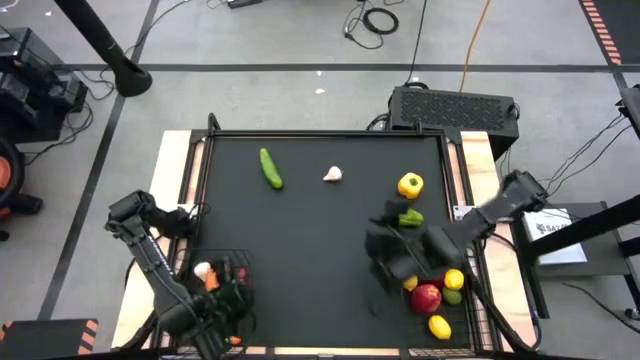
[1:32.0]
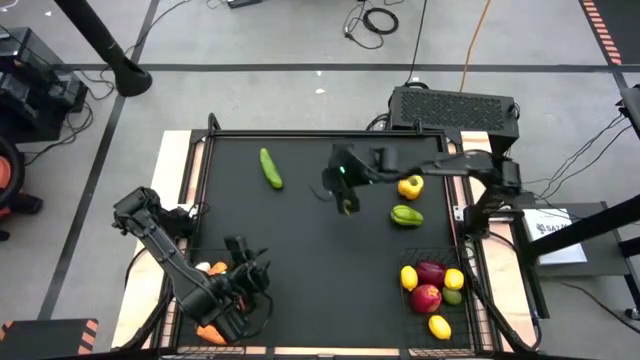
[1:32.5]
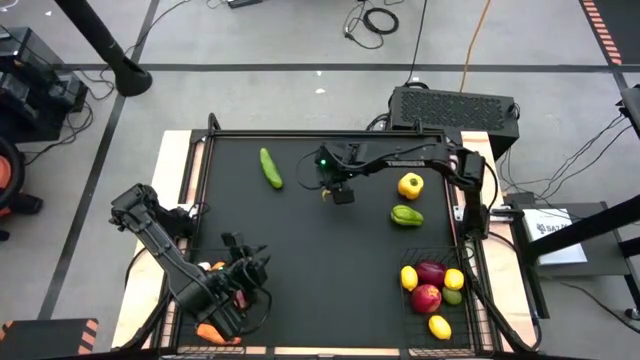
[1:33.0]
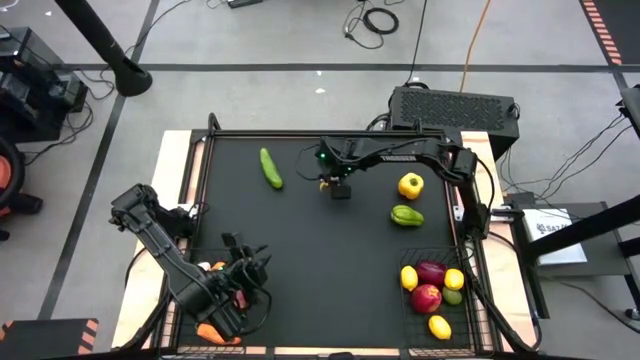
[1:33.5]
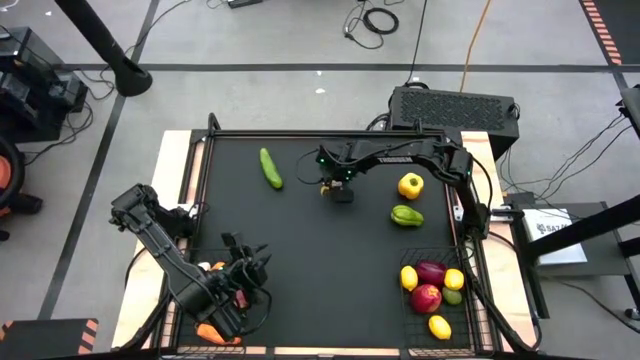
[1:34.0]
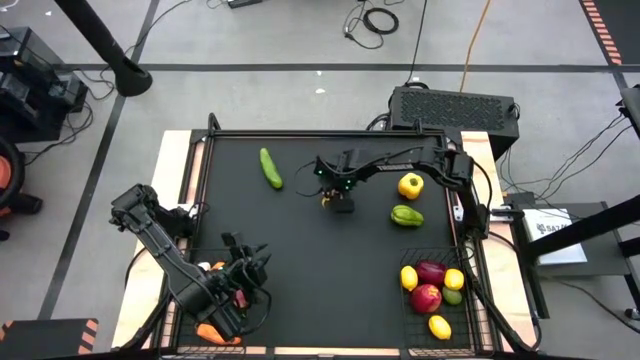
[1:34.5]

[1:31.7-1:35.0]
Task: Sort produce into baskets
Put the garlic into the the basket on the bottom left

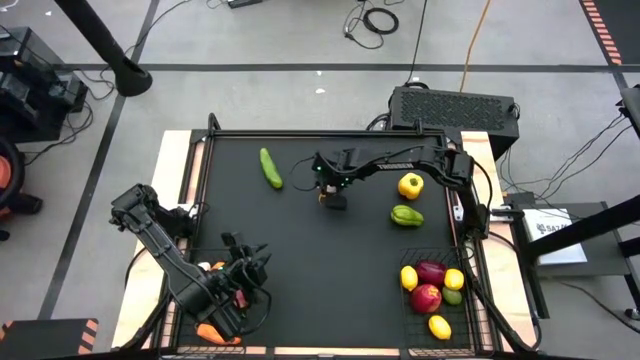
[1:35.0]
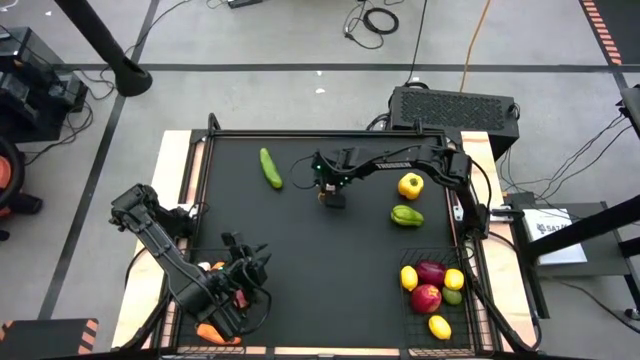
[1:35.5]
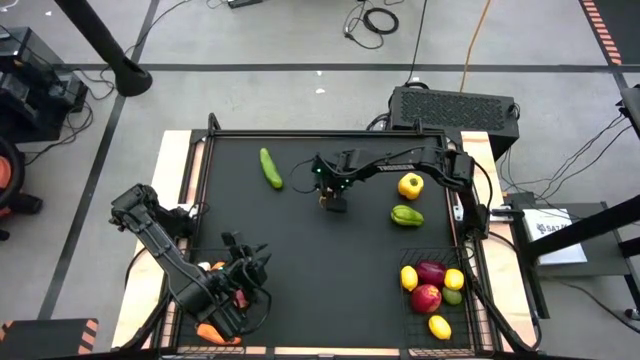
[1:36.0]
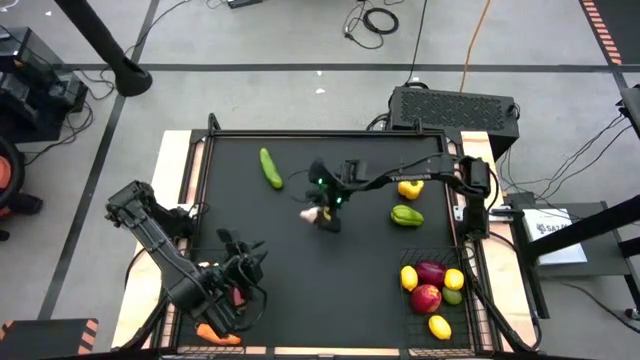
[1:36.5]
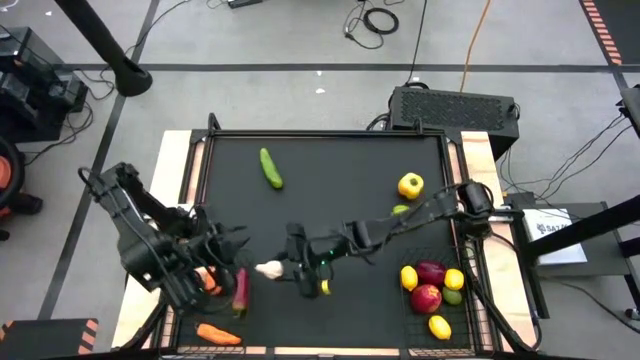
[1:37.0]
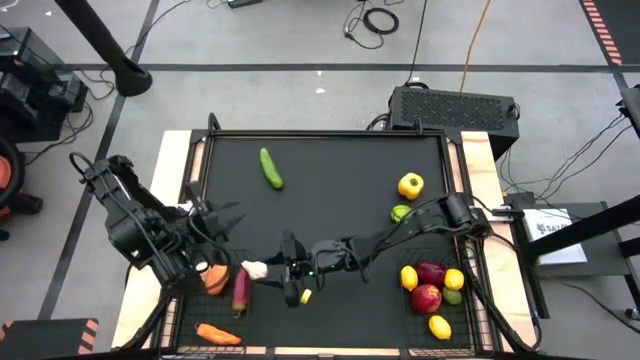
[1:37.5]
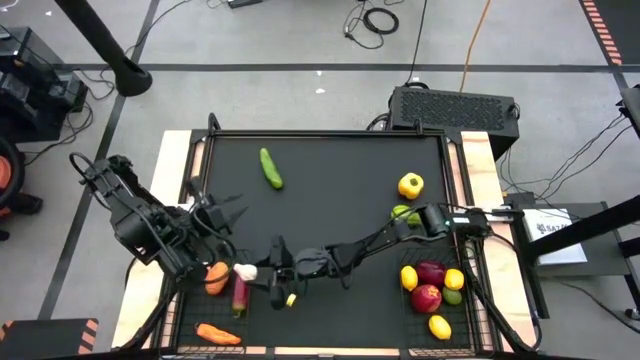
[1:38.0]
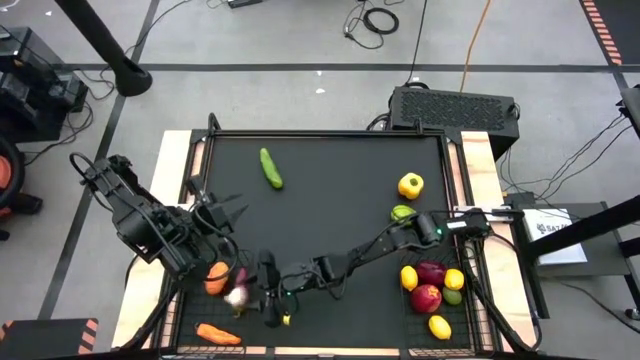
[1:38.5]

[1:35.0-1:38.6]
Put the garlic into the bottom left basket

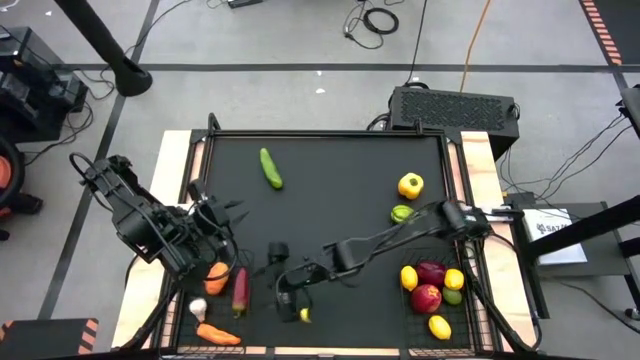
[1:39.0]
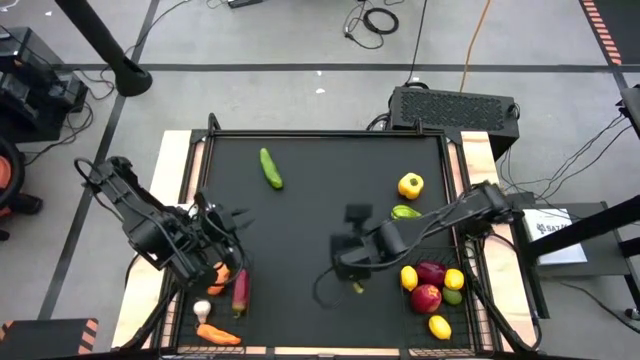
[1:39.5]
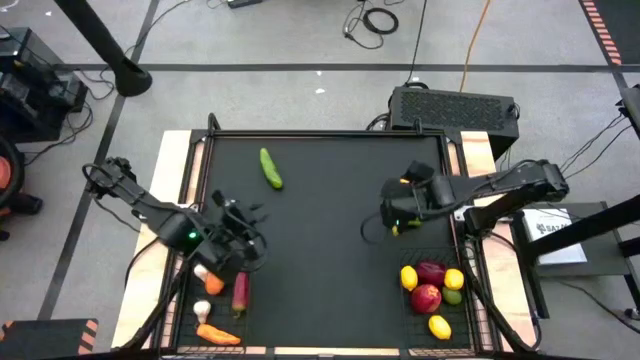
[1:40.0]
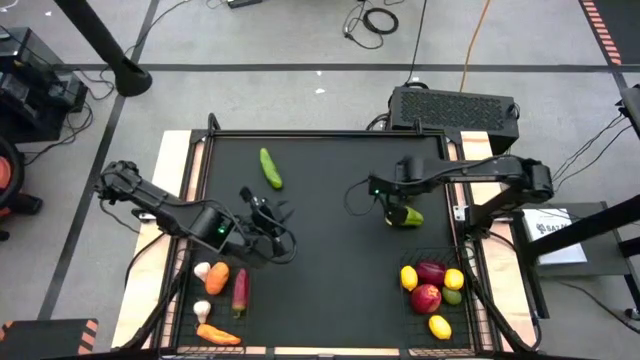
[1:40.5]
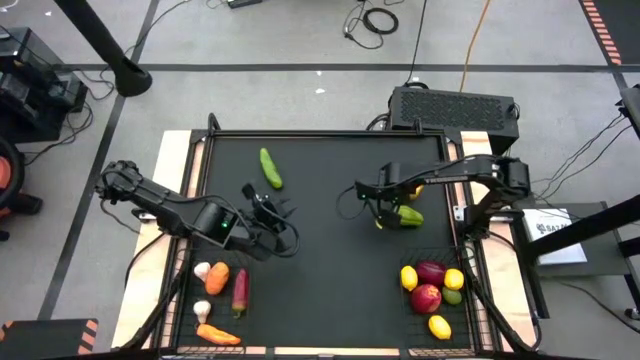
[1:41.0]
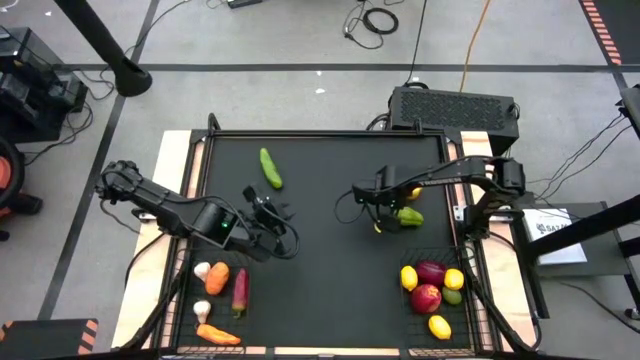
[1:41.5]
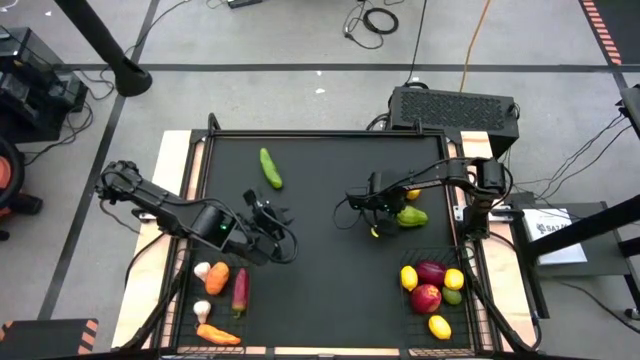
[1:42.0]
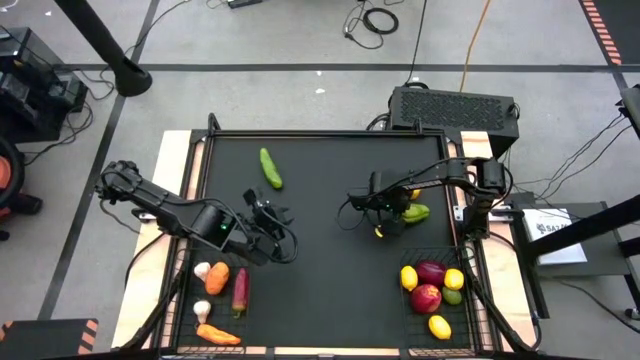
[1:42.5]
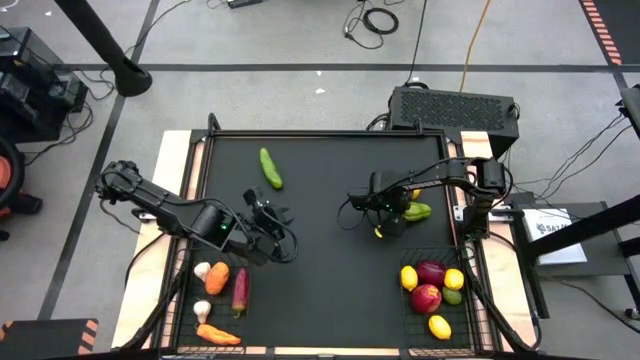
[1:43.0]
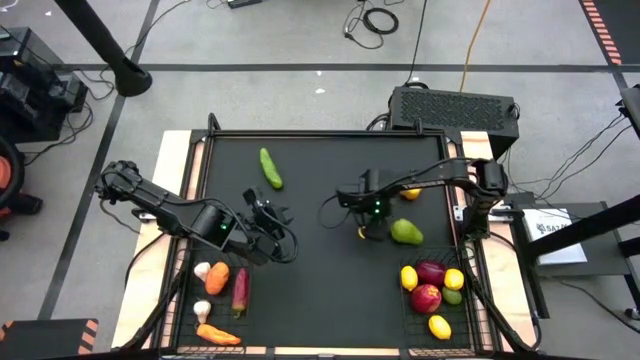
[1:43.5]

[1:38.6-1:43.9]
Put the chayote into the basket on the bottom left

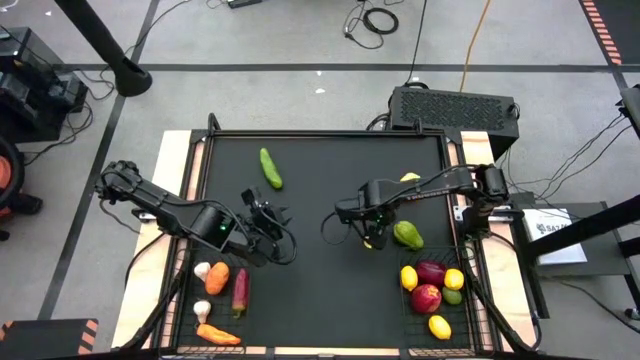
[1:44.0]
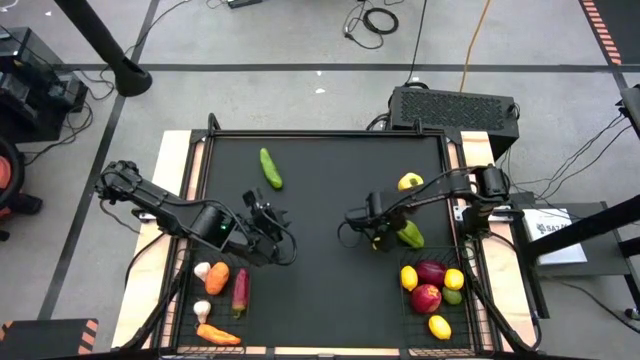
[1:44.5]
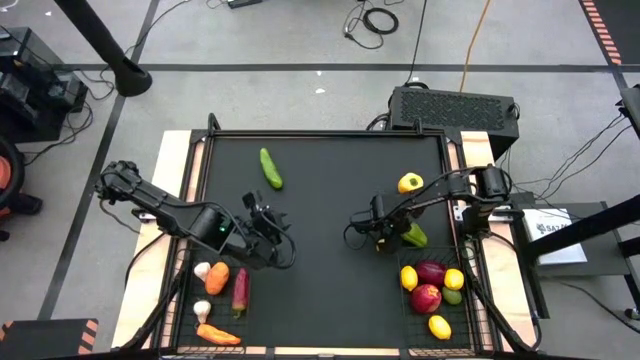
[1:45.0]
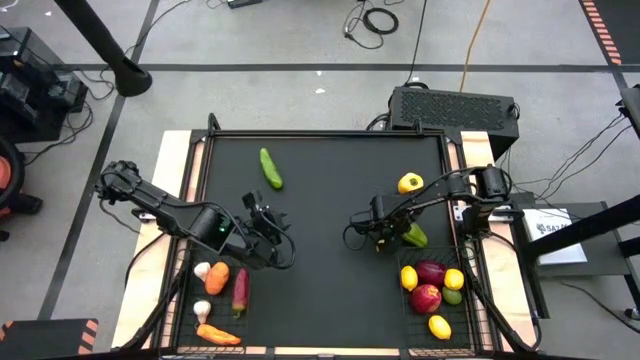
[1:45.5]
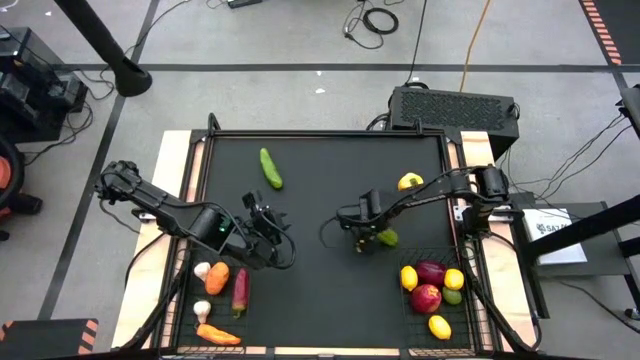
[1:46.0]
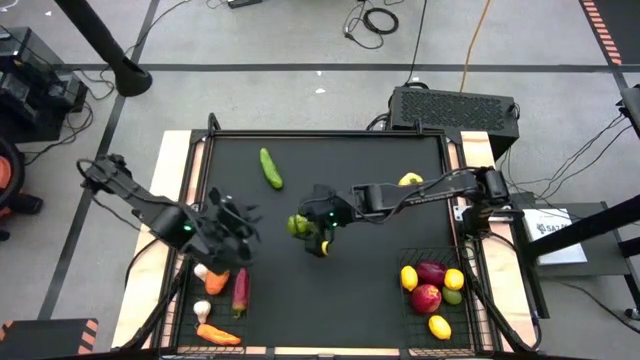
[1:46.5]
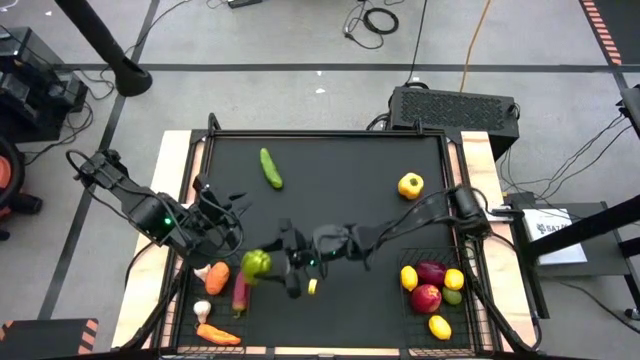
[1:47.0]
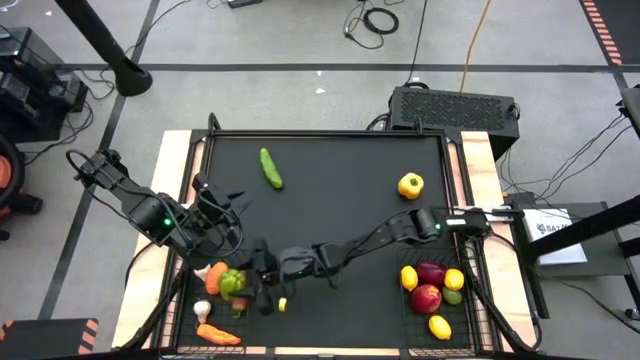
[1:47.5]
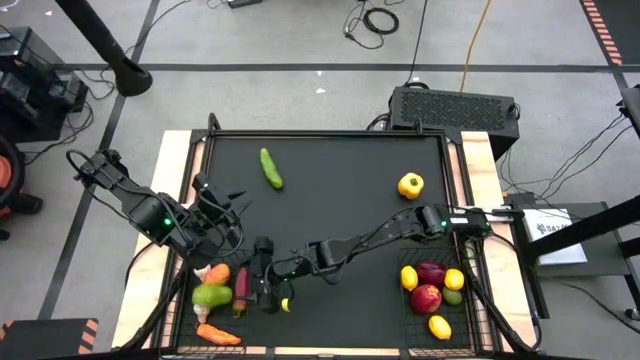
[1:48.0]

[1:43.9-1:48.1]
Put the chayote into the bottom left basket

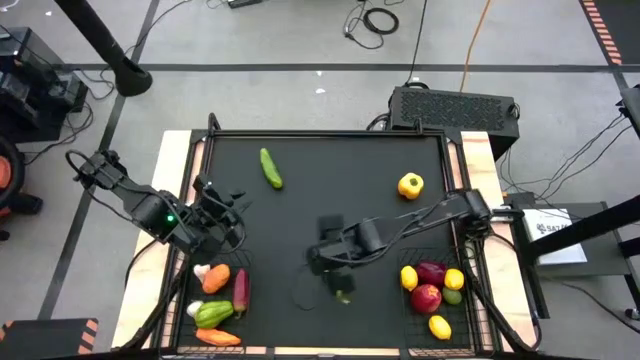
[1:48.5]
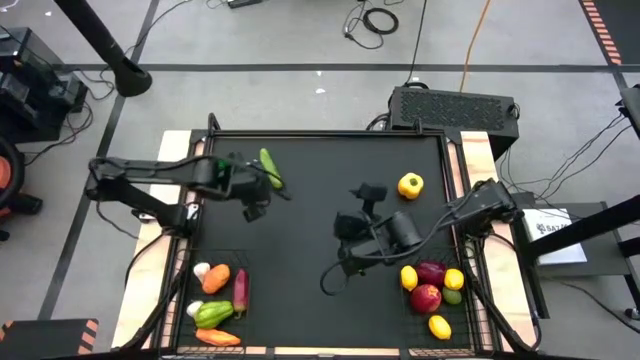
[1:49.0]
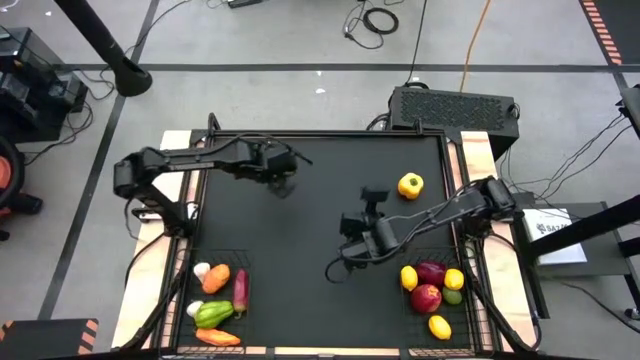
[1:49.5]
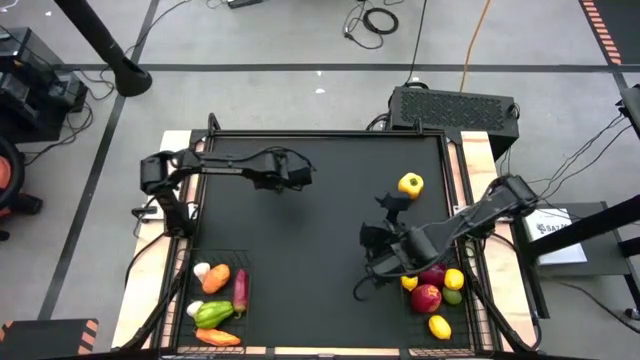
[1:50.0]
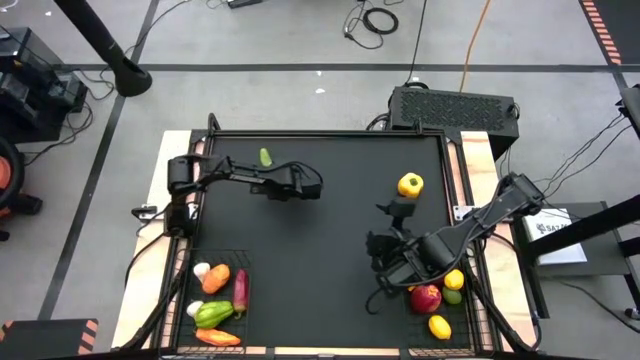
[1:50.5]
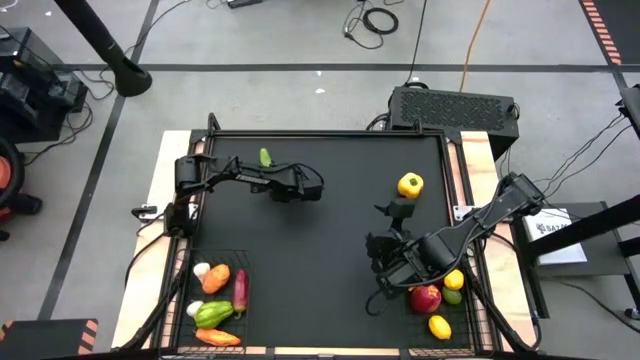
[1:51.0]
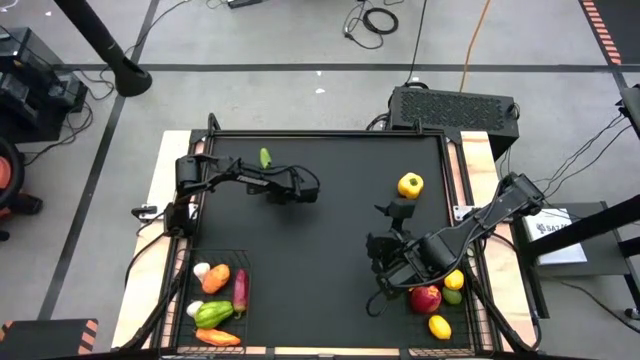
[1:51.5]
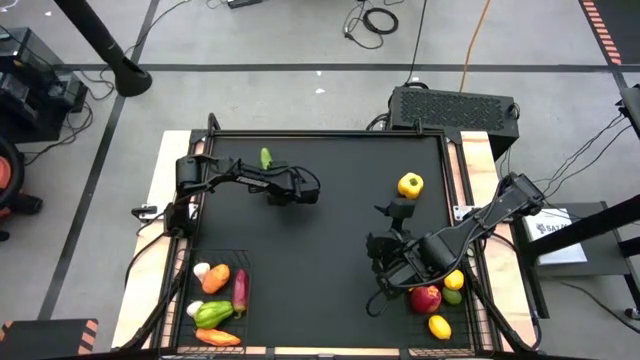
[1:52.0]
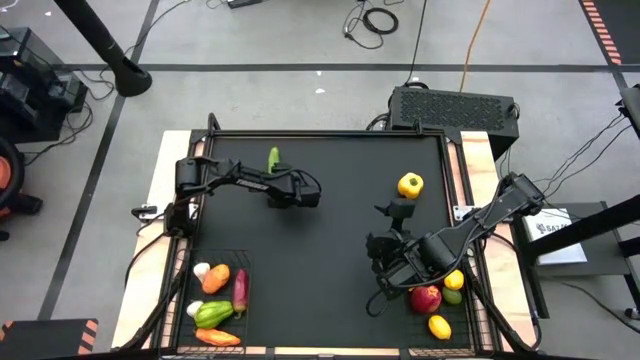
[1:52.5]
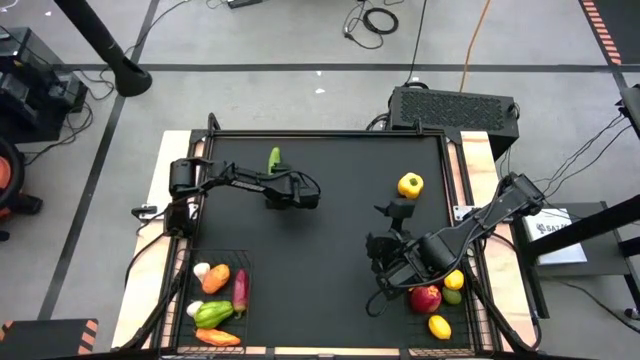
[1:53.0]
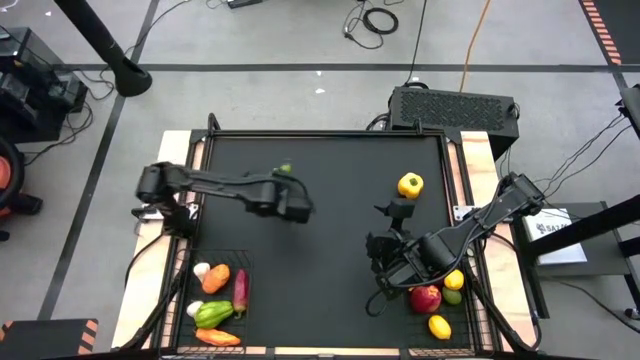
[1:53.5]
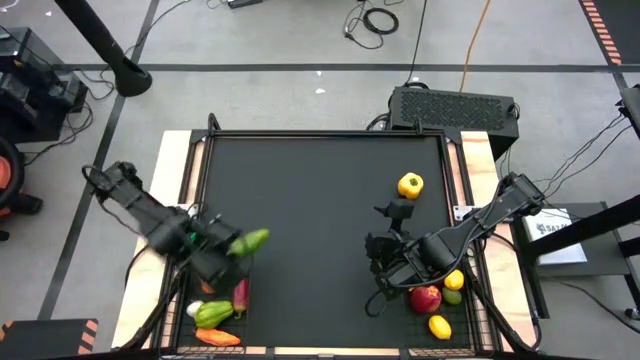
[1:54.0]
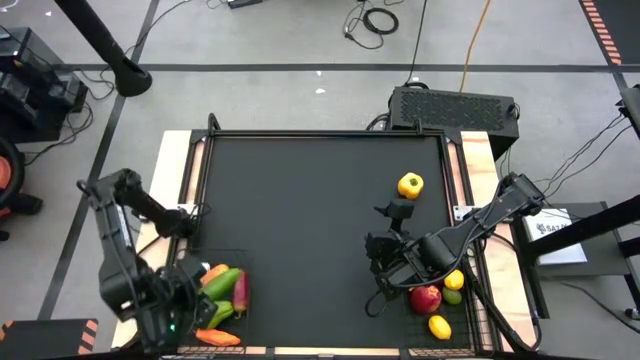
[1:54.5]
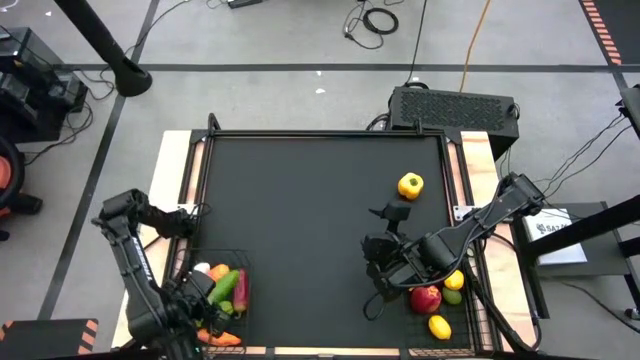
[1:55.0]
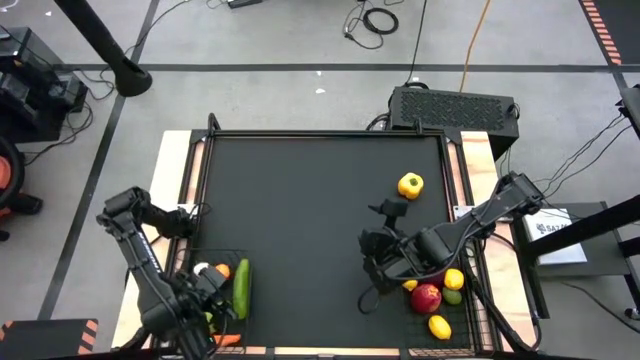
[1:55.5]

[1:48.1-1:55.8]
Put the cucumber into the bottom left basket
